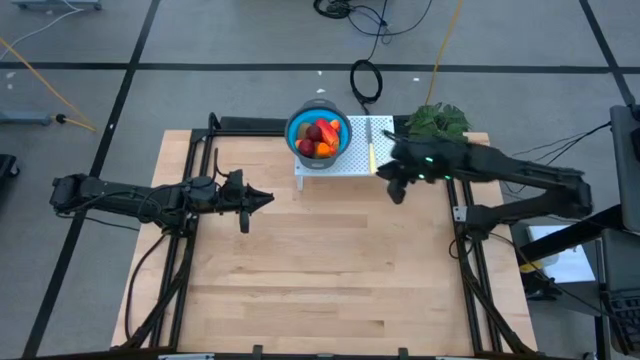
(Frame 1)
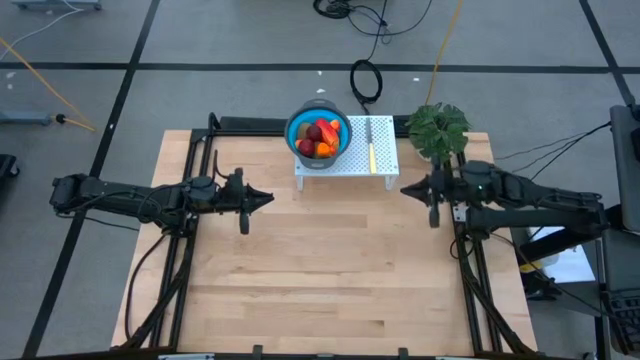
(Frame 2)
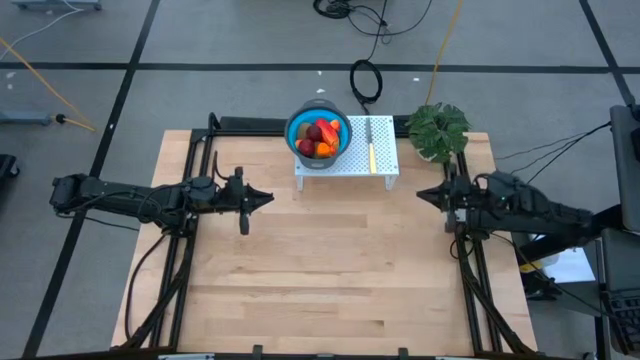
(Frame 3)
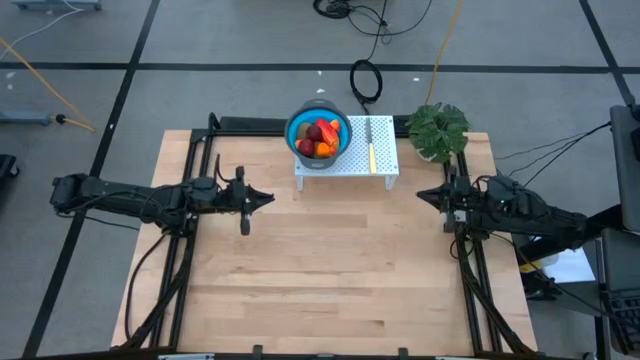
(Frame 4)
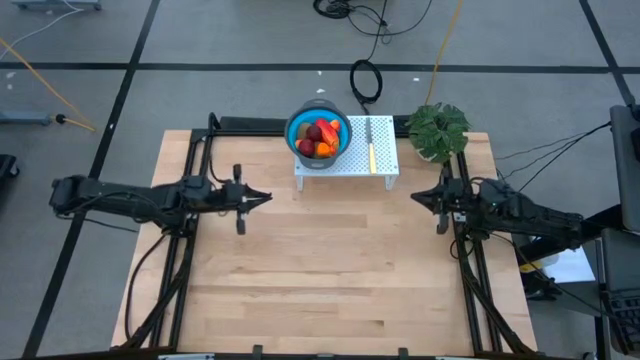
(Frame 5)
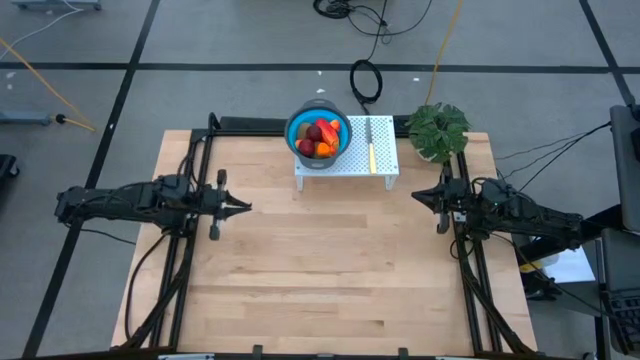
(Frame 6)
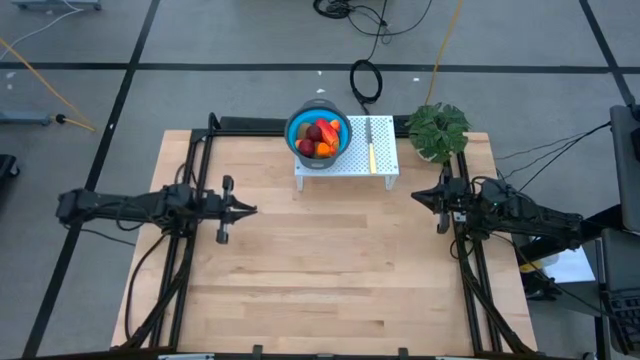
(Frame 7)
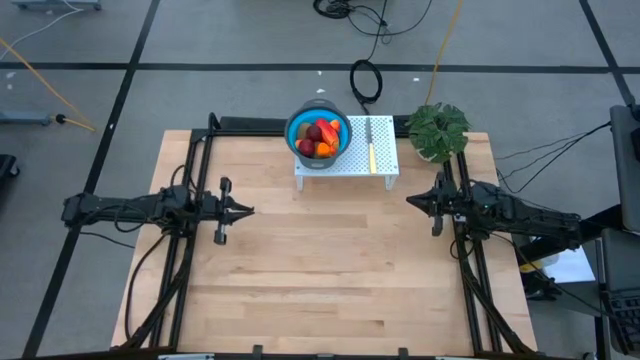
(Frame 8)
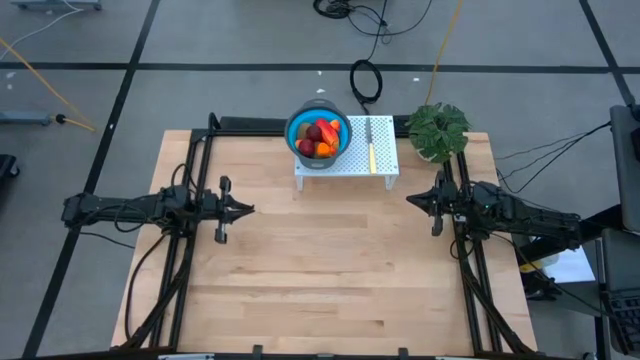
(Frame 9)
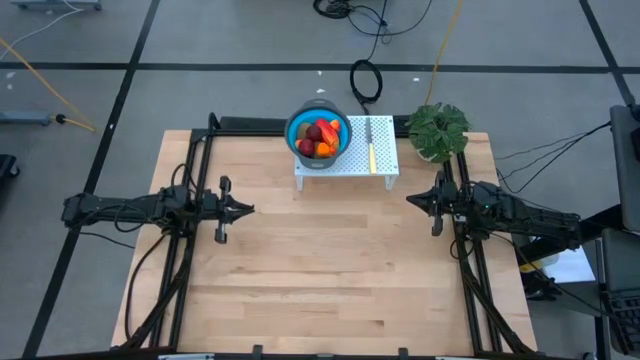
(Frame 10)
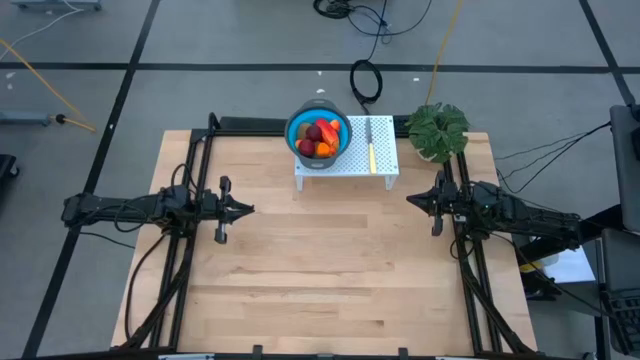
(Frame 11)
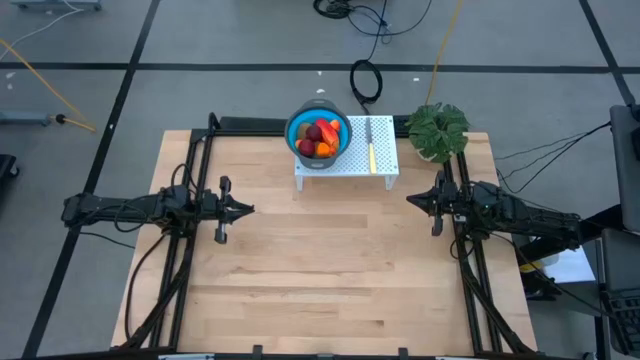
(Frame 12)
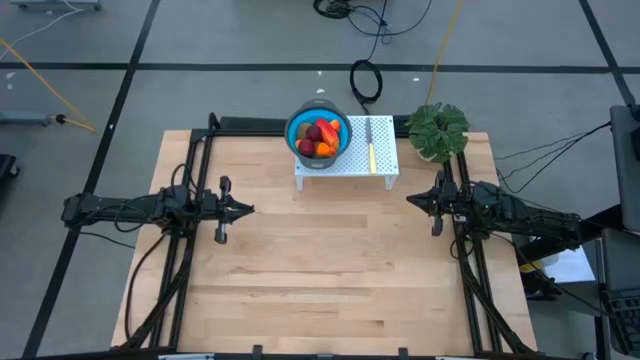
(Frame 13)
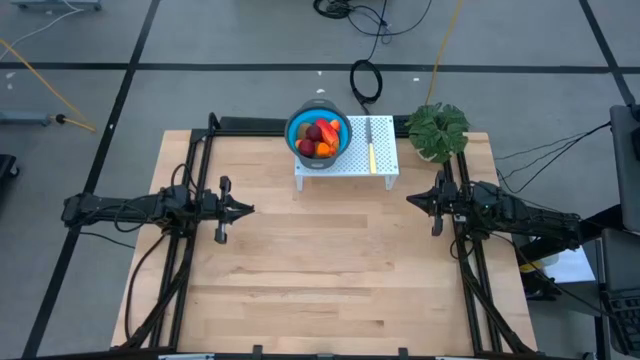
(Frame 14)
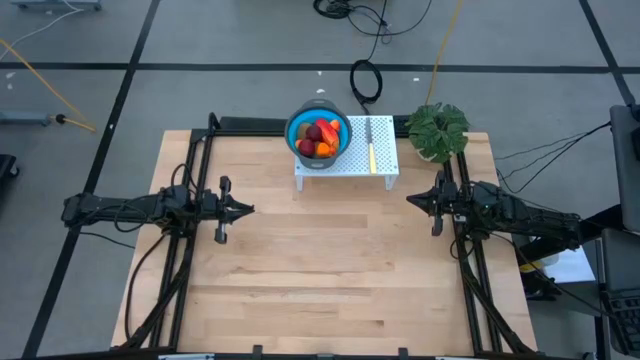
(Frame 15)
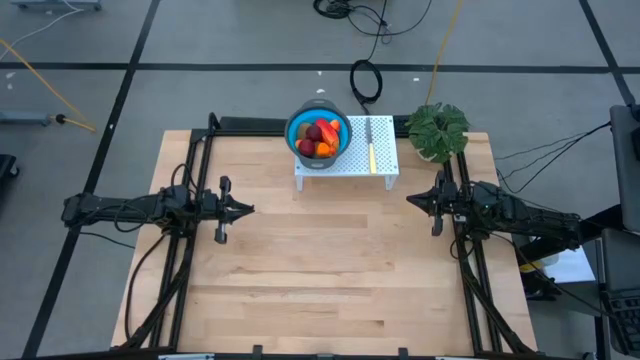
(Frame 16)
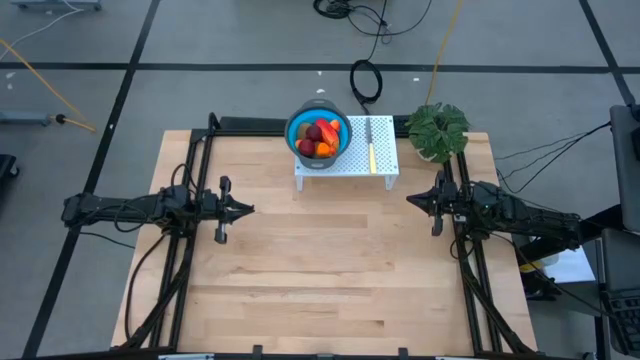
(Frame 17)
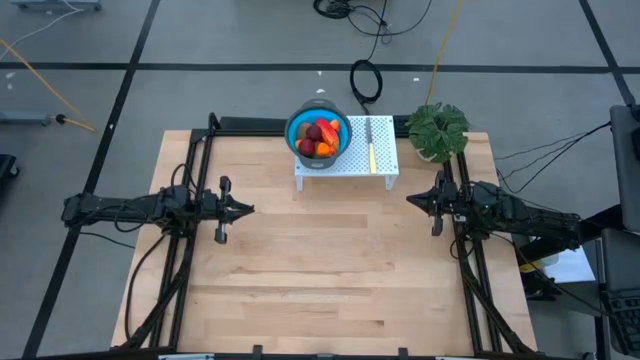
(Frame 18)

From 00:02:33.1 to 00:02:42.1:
Task: Pick & Place Fruit
Return to Home Position

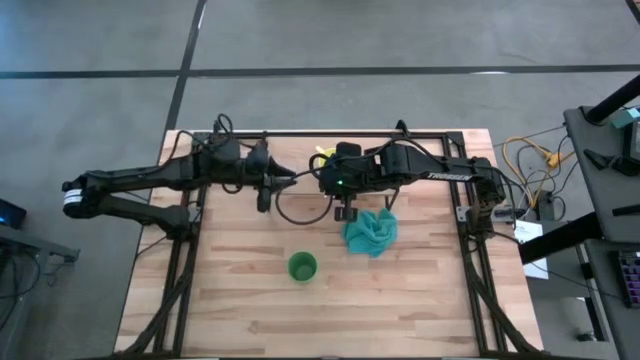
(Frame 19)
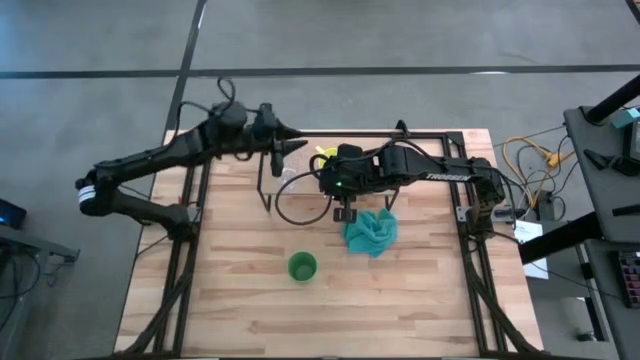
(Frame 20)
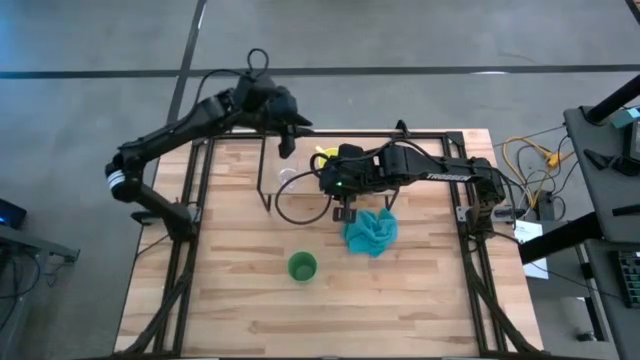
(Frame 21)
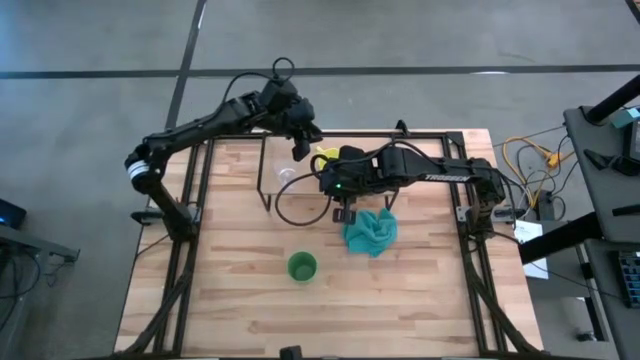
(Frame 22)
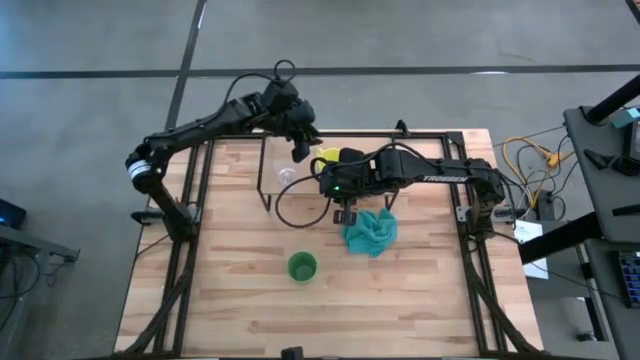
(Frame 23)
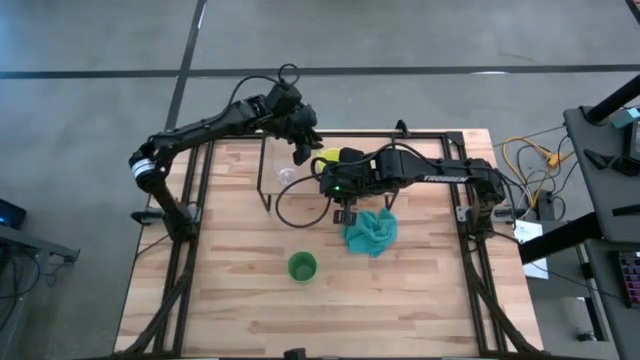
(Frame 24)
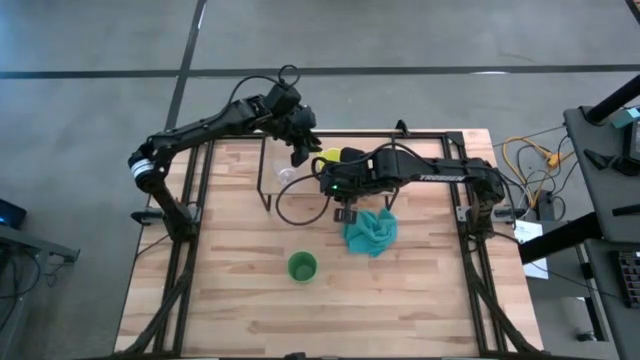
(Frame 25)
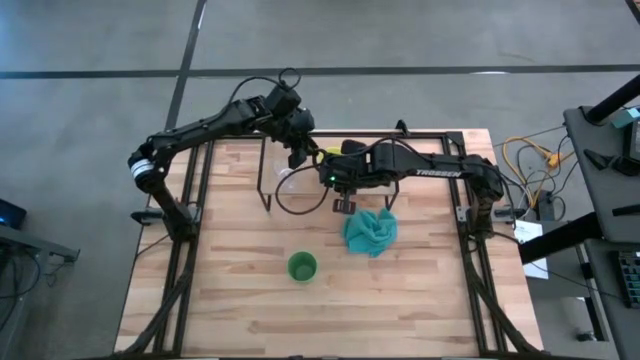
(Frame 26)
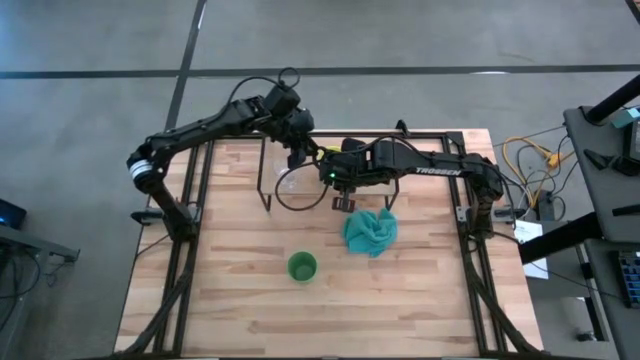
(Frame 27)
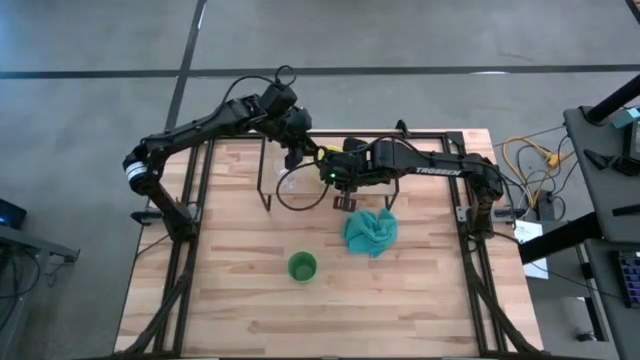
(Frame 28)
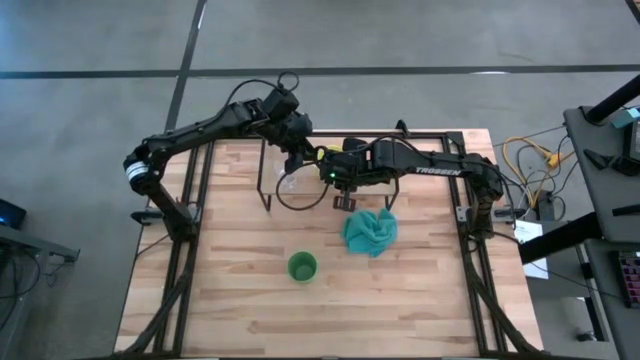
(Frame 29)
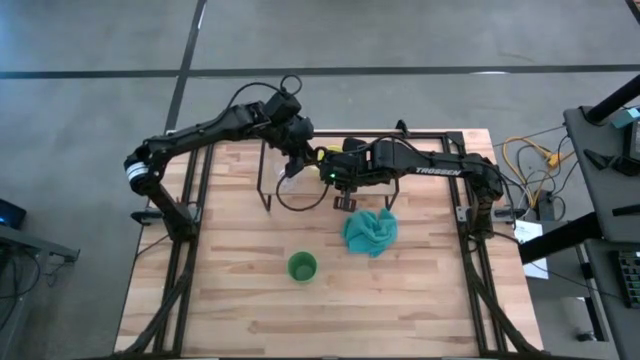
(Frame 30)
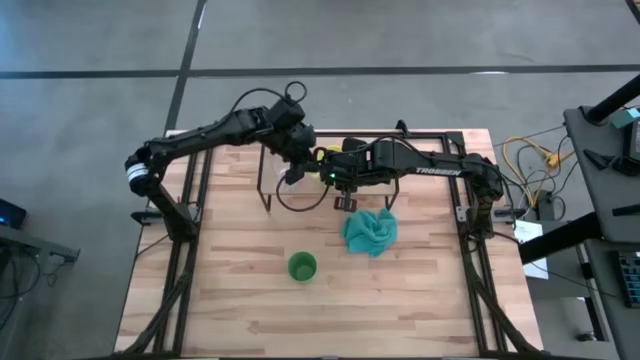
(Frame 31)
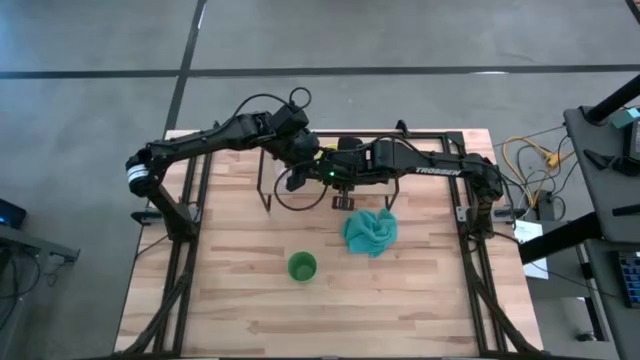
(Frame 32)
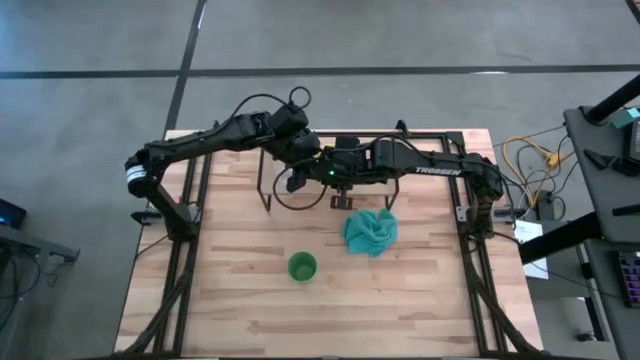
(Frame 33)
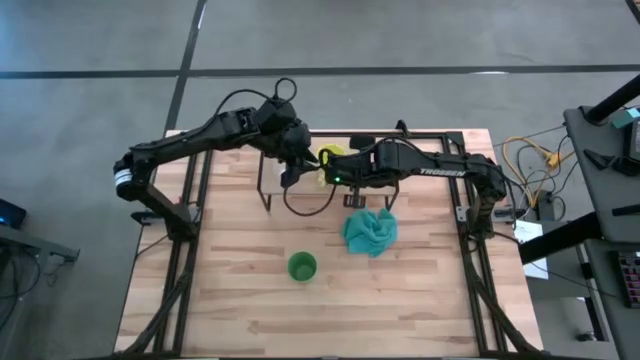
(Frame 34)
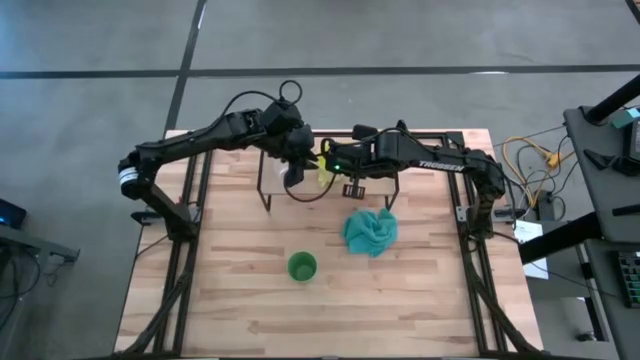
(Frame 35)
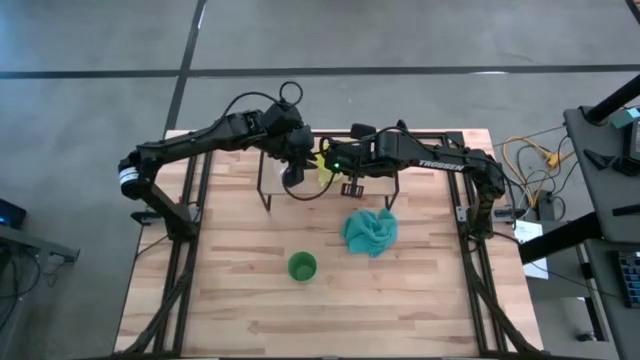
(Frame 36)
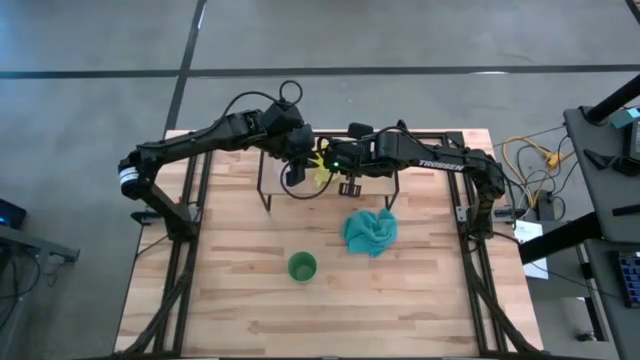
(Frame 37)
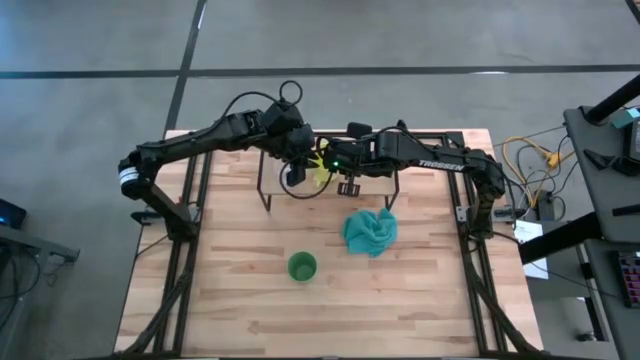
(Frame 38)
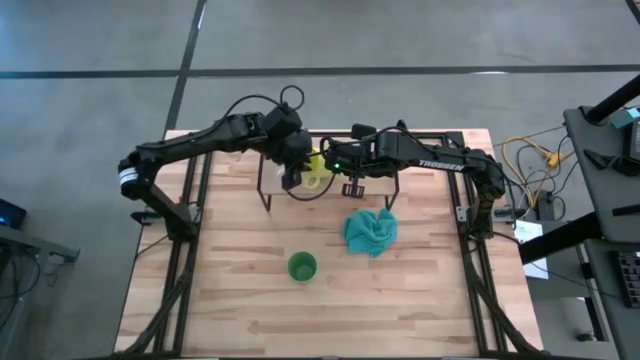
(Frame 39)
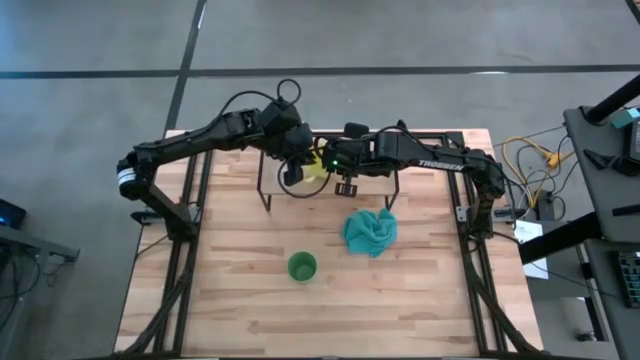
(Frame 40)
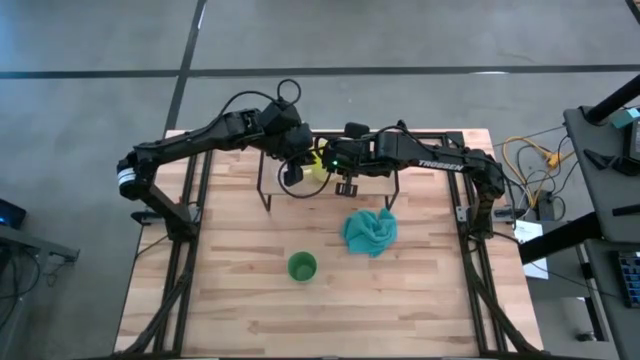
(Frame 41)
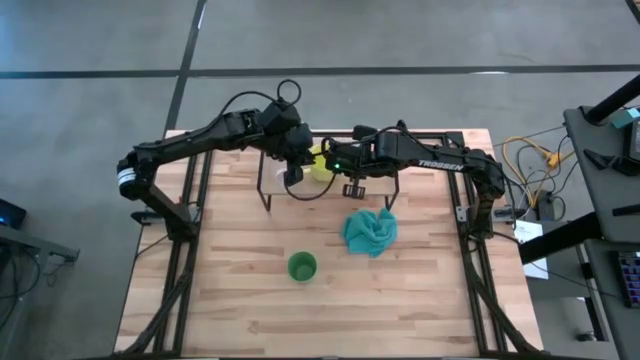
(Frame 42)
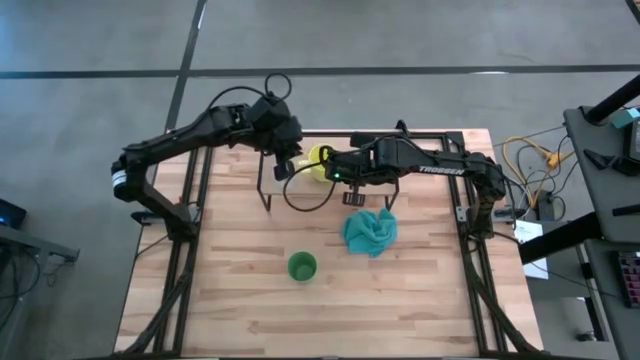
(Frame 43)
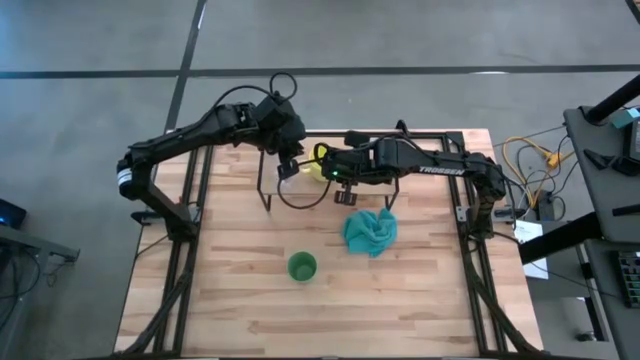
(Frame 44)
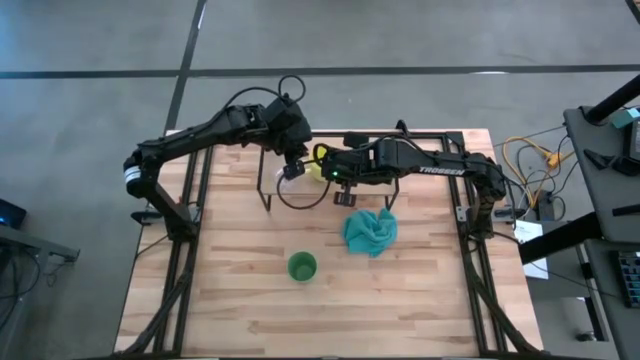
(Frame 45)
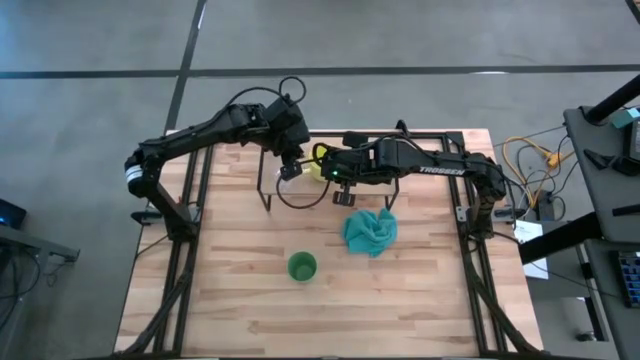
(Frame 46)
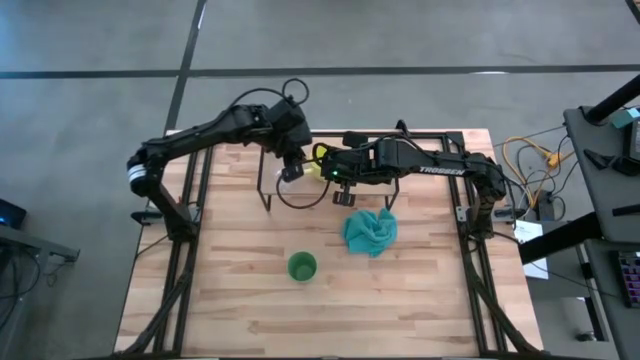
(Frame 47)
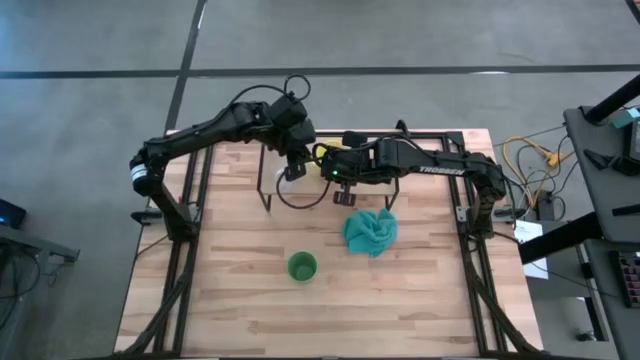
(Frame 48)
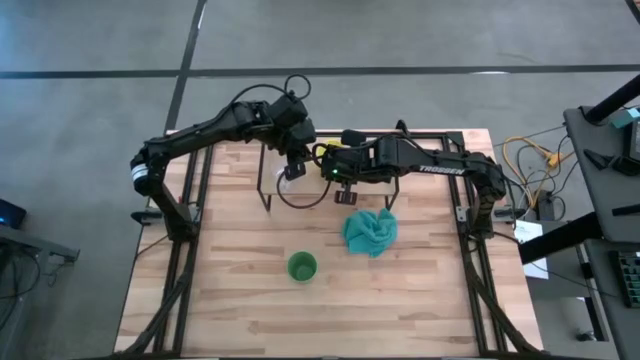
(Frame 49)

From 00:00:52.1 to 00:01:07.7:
Task: Stack small to large cups/mugs on shelf
Adjust the yellow cup on the shelf
